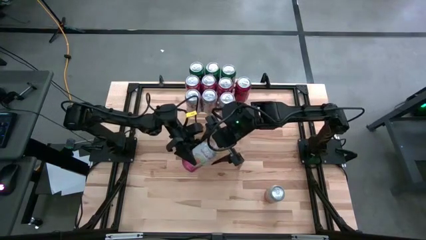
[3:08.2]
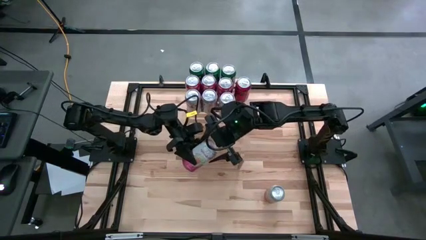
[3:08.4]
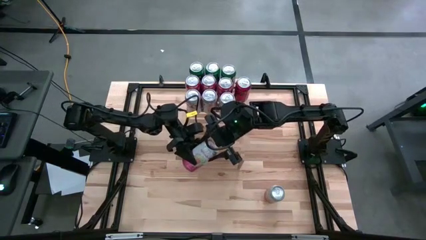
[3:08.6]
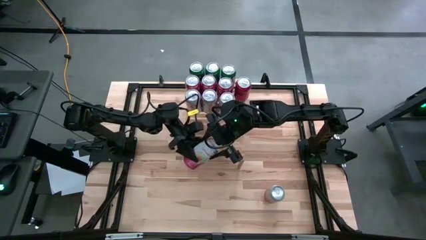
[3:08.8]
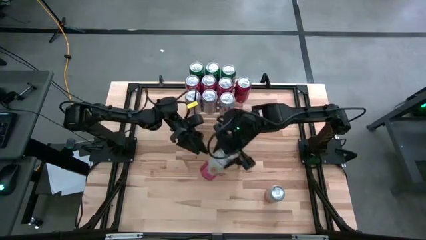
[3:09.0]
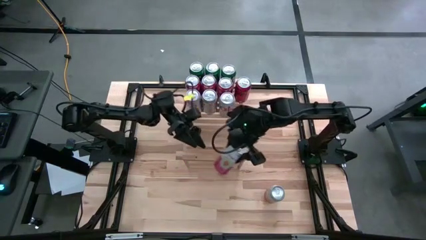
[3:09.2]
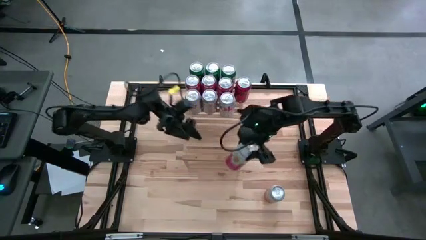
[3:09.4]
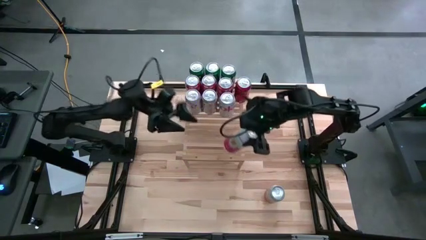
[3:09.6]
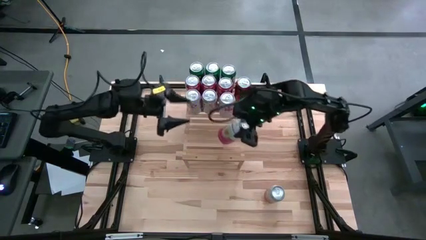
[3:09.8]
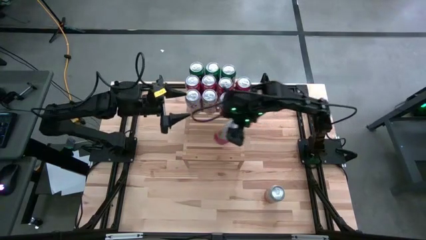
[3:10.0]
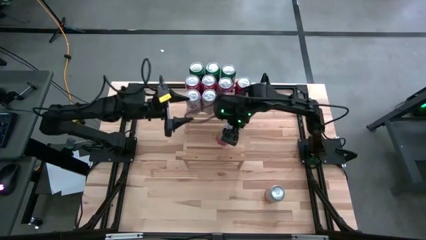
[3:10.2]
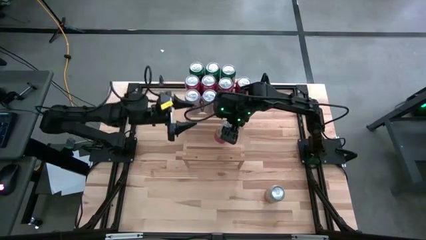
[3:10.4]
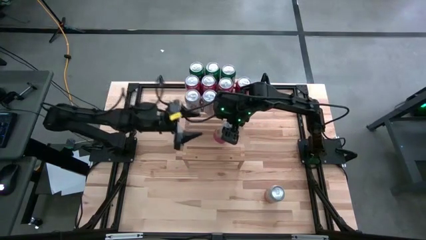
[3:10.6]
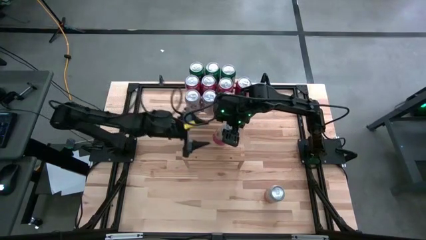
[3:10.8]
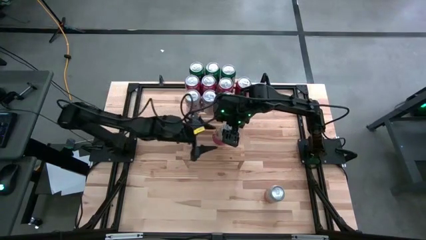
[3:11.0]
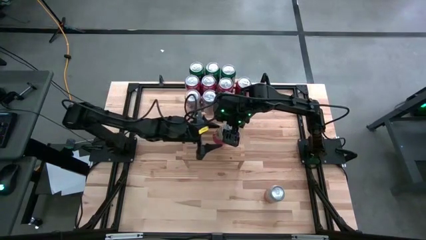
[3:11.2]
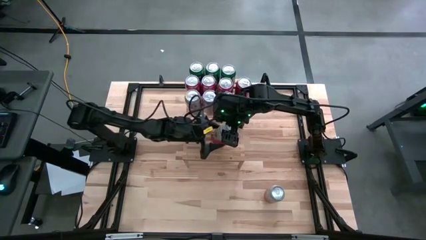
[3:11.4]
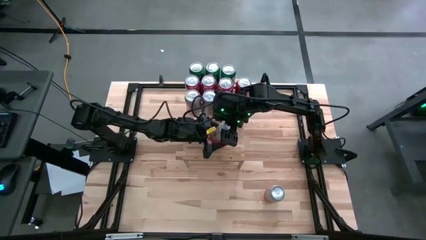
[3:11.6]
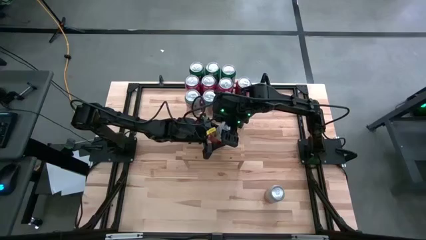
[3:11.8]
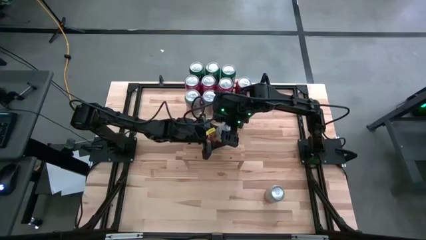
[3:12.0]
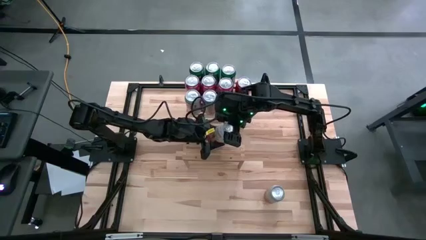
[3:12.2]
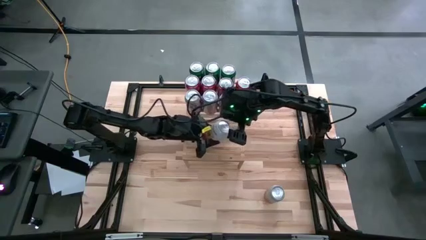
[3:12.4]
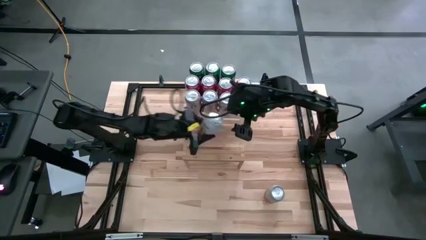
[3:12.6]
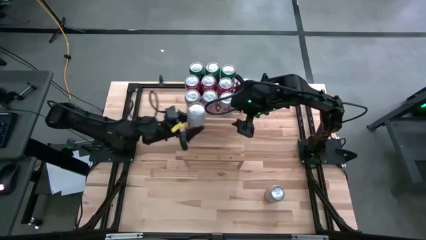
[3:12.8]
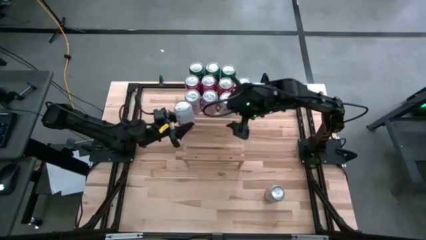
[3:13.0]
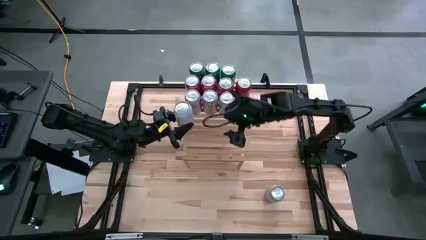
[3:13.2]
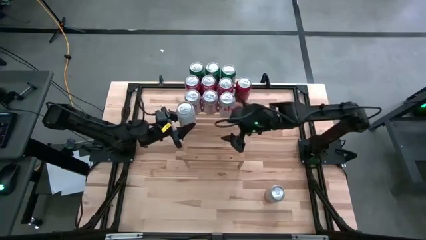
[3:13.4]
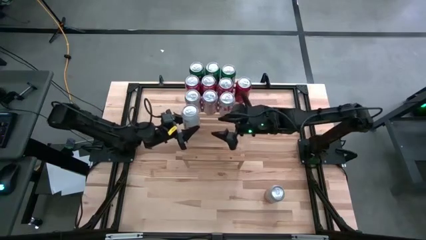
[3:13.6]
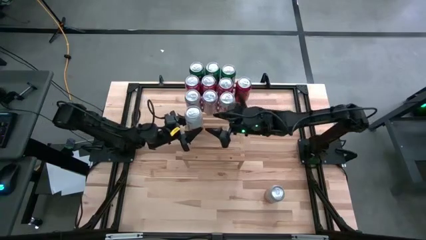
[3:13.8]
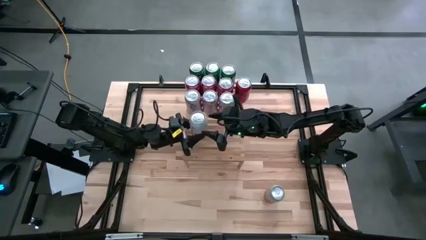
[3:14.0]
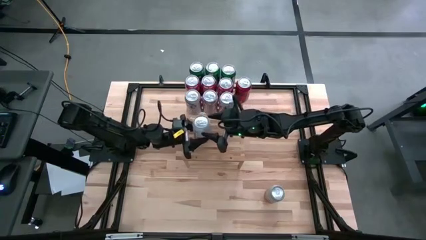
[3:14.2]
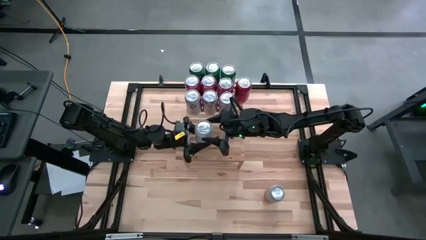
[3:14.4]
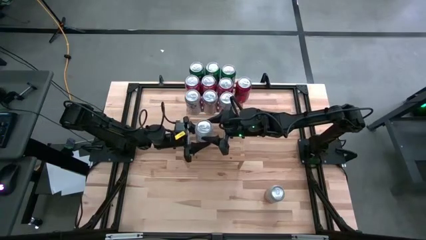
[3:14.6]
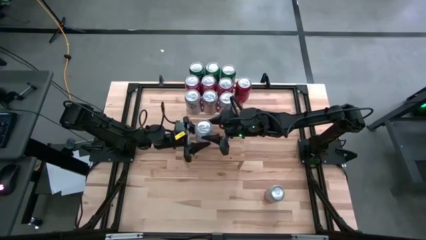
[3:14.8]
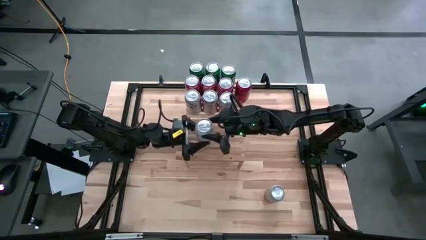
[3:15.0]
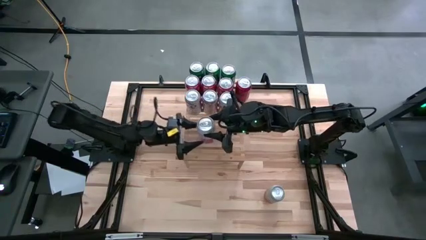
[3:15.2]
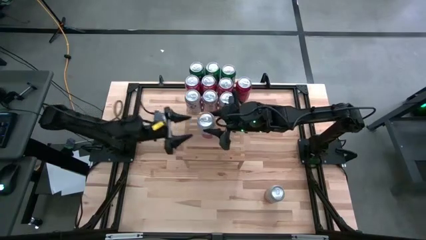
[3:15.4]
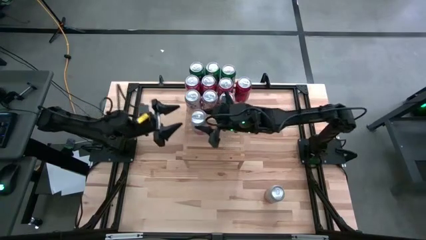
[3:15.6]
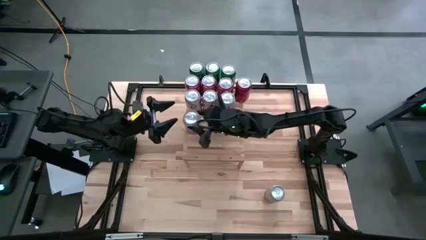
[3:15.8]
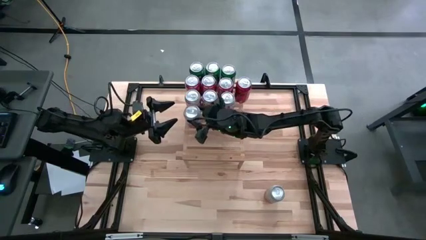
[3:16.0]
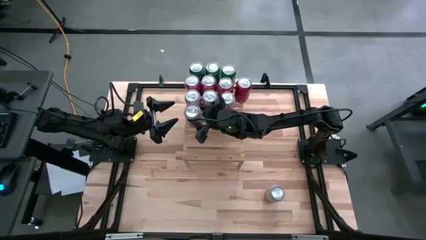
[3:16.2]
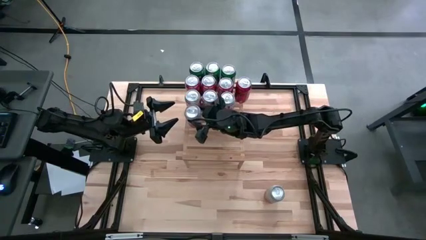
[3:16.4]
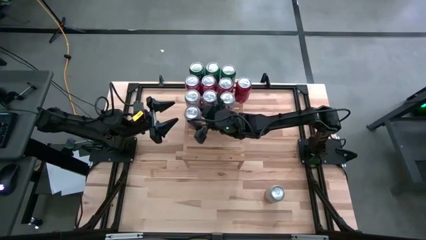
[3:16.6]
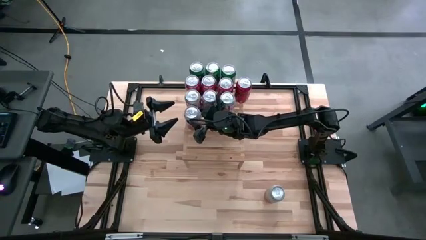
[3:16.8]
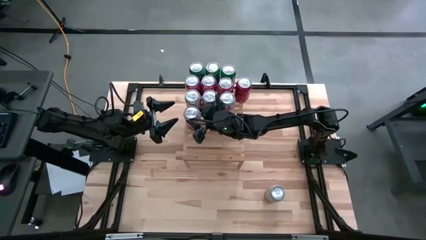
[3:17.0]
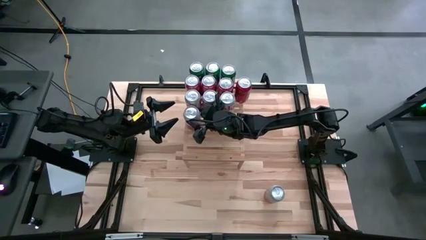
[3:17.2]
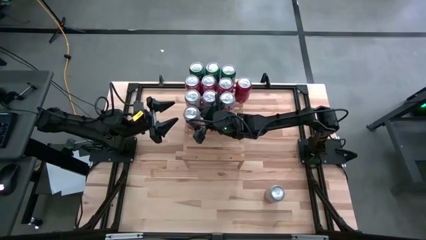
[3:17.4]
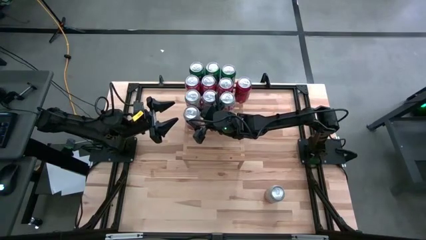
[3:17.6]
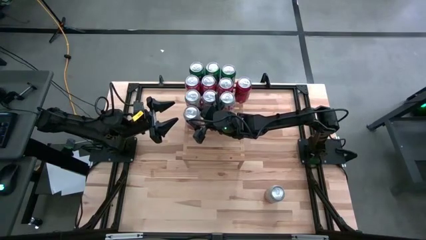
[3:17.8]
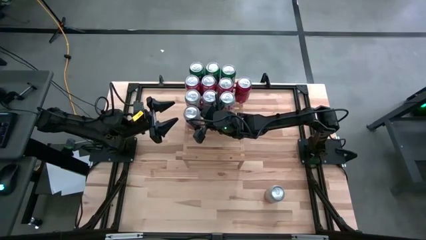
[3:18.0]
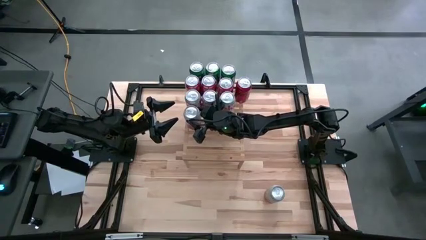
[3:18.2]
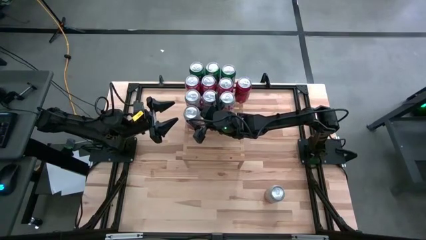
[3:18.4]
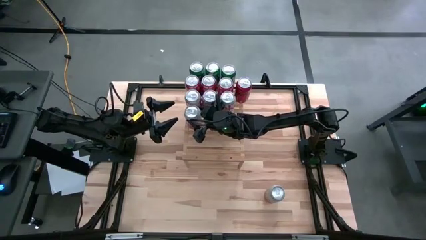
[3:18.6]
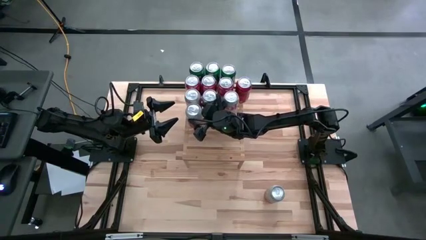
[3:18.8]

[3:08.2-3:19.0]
Task: Place canned beverage on shelf
Put the top pink soda can on the shelf

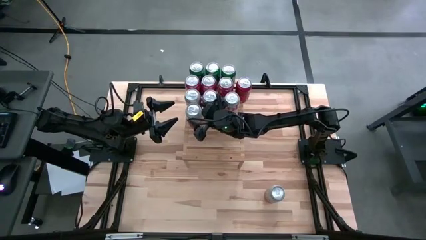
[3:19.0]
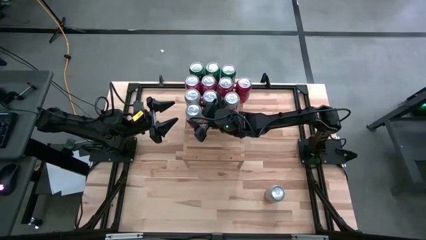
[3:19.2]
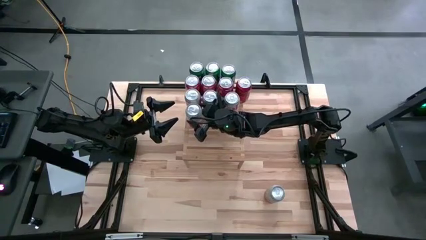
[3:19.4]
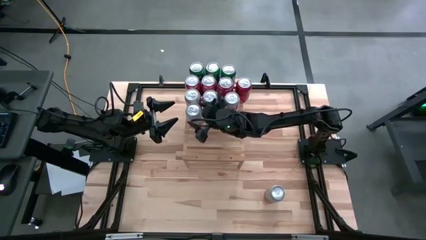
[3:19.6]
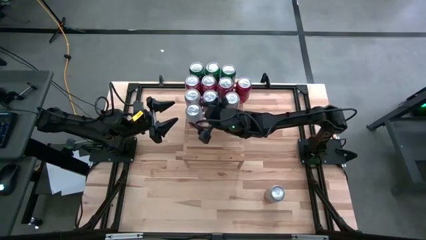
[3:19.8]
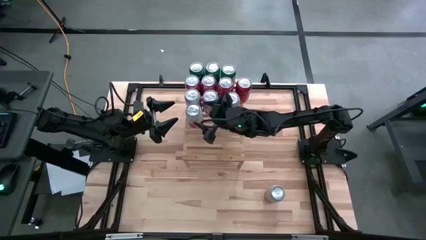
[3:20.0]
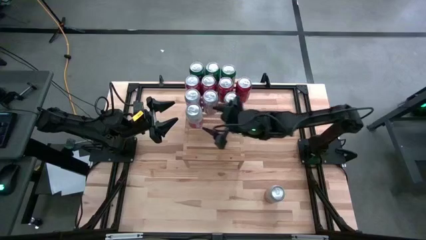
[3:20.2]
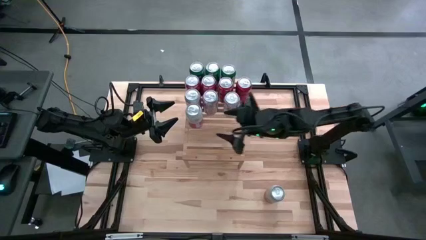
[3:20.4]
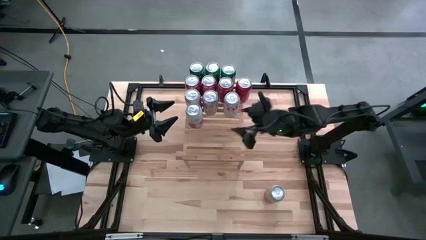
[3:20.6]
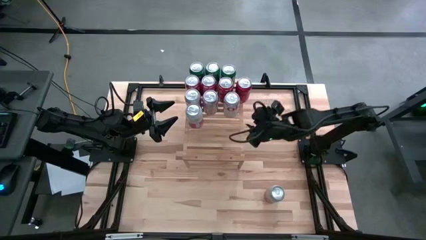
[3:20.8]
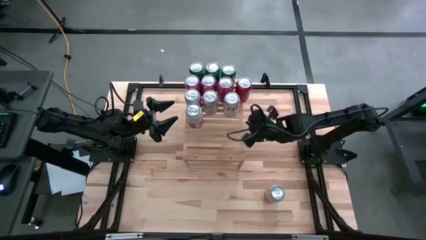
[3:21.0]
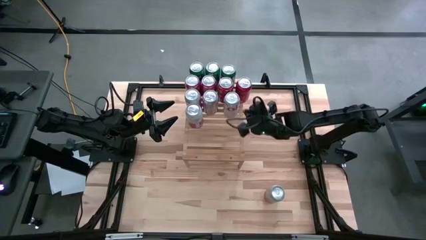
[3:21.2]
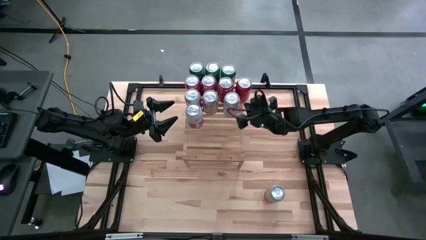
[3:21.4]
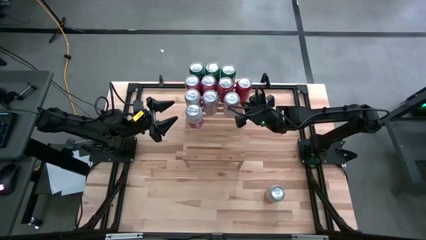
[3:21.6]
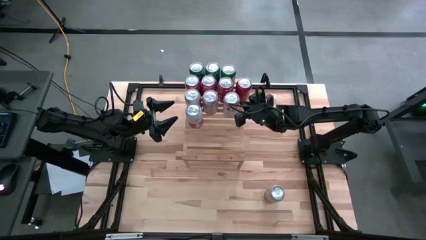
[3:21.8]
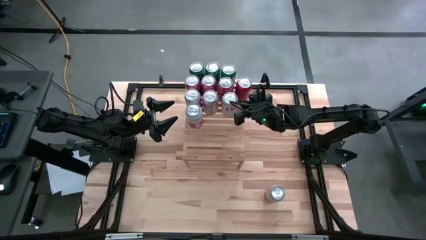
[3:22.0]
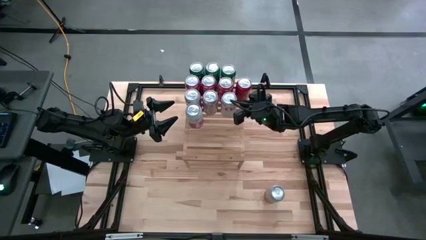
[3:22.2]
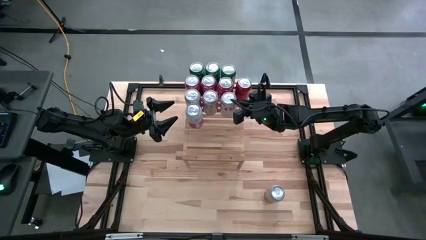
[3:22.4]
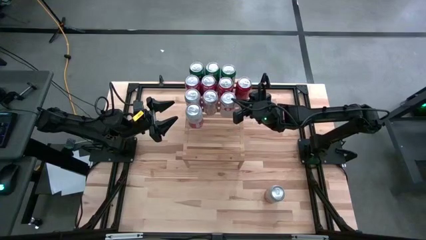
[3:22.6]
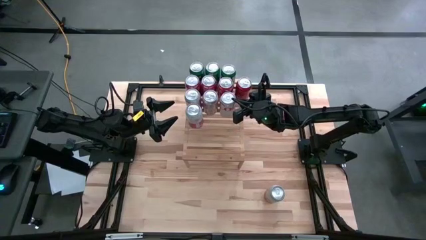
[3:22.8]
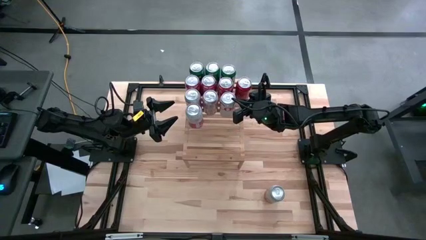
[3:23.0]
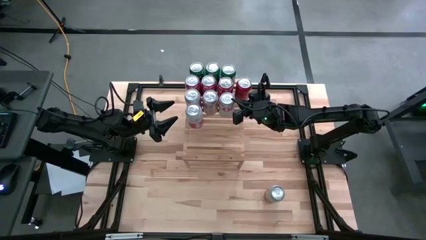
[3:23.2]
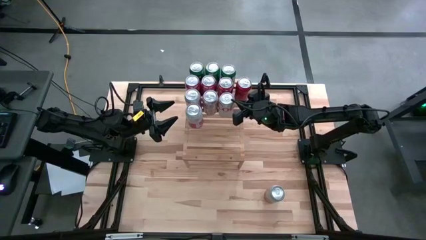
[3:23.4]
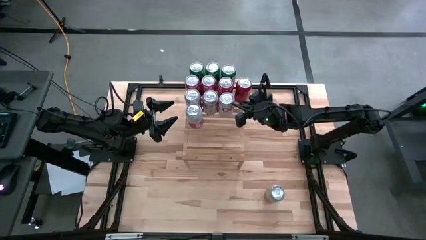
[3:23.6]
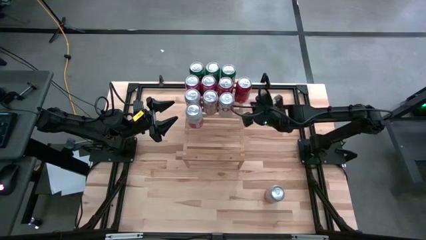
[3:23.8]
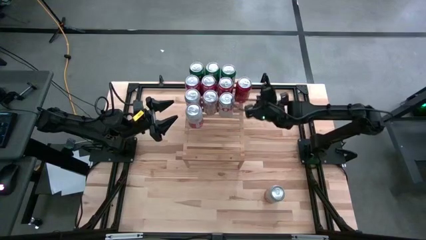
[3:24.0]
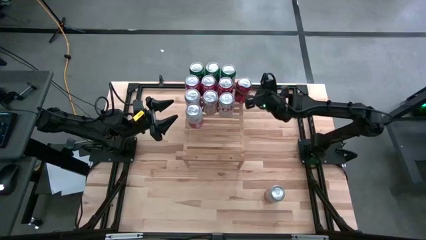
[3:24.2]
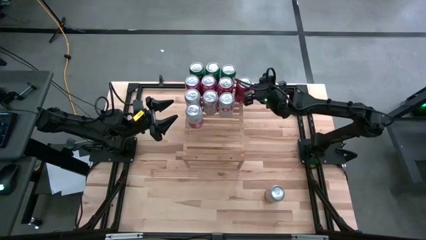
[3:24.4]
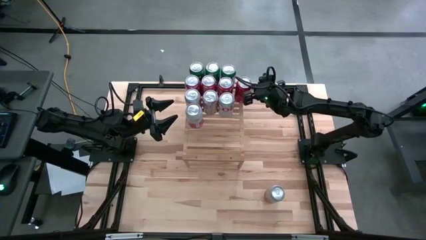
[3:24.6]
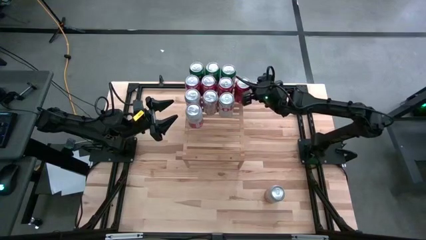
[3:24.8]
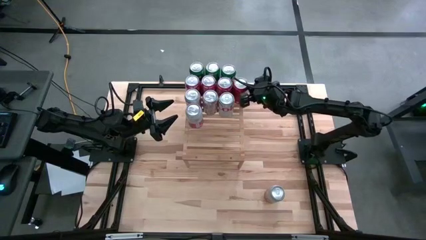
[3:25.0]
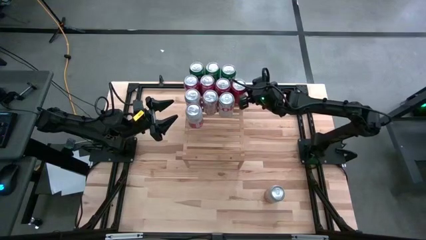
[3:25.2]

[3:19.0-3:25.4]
Adjust the soda cans on the shelf
